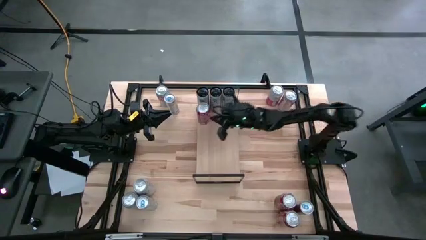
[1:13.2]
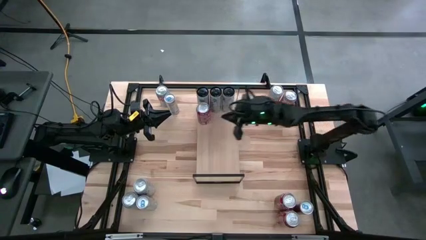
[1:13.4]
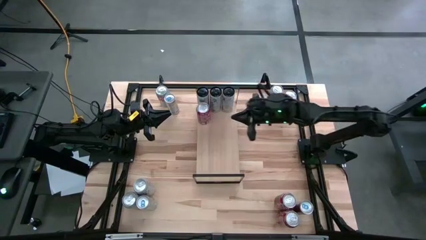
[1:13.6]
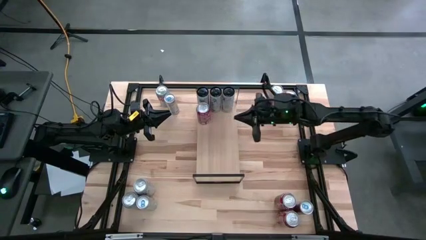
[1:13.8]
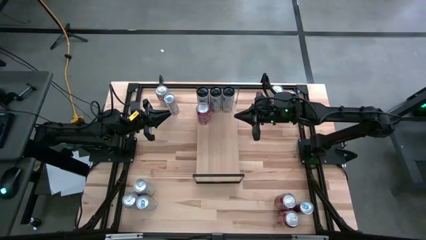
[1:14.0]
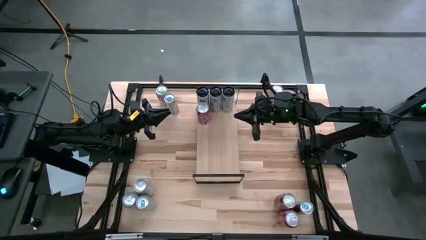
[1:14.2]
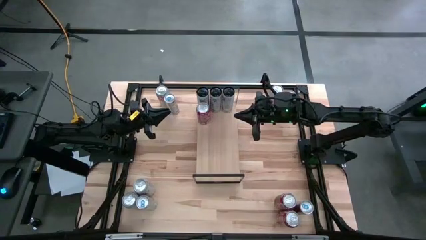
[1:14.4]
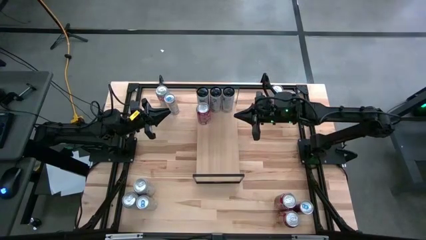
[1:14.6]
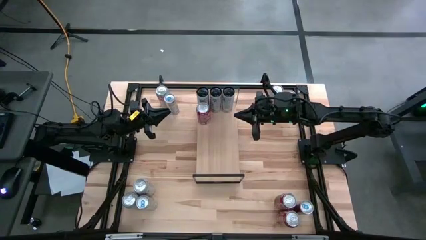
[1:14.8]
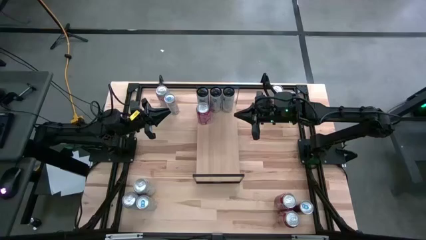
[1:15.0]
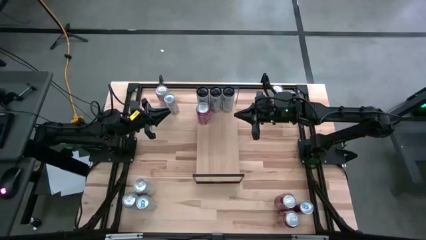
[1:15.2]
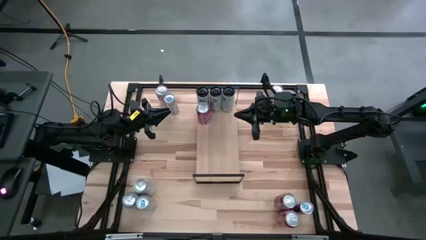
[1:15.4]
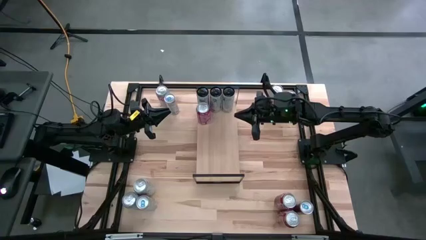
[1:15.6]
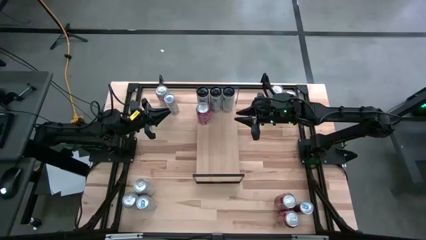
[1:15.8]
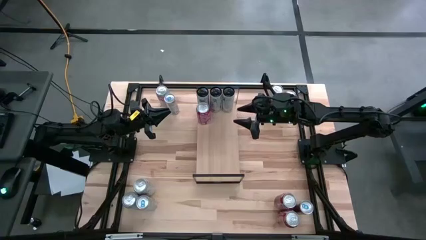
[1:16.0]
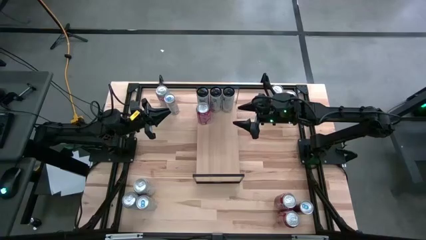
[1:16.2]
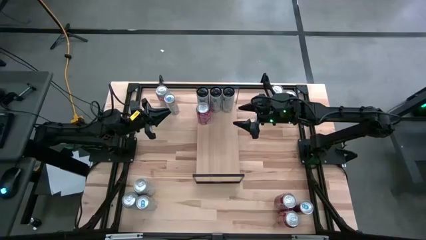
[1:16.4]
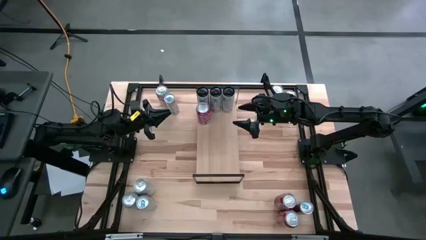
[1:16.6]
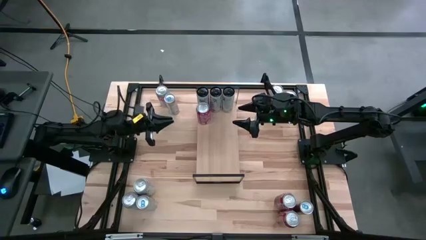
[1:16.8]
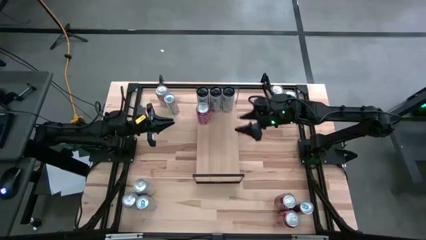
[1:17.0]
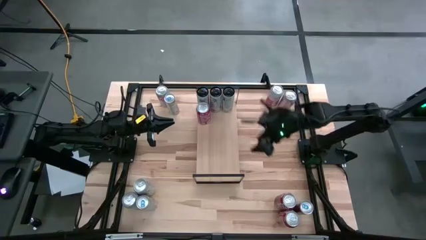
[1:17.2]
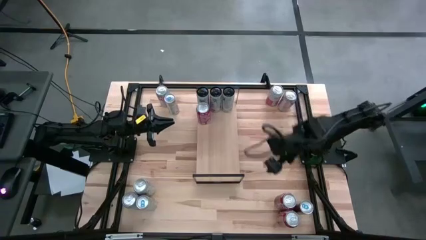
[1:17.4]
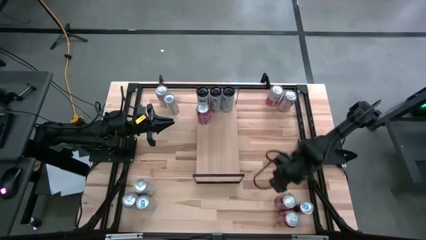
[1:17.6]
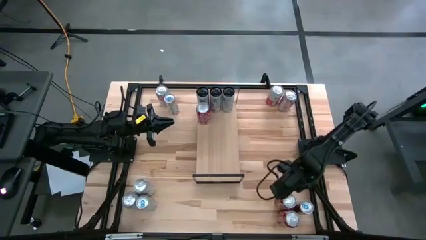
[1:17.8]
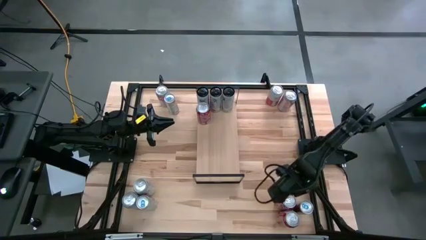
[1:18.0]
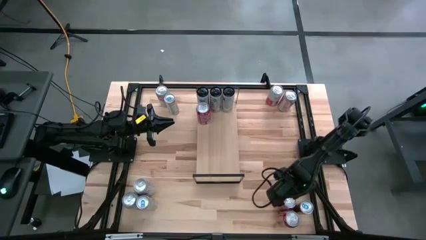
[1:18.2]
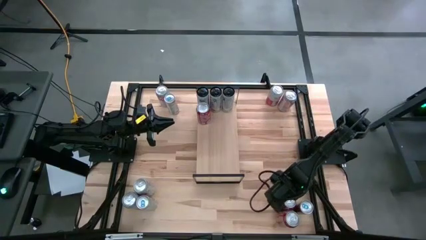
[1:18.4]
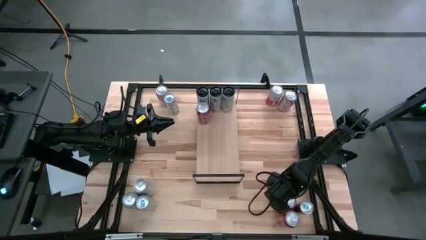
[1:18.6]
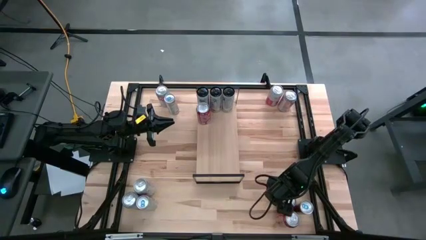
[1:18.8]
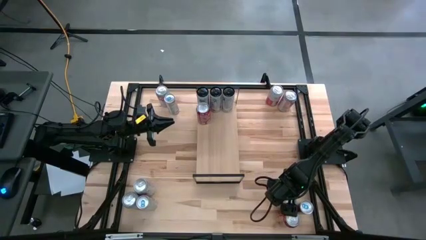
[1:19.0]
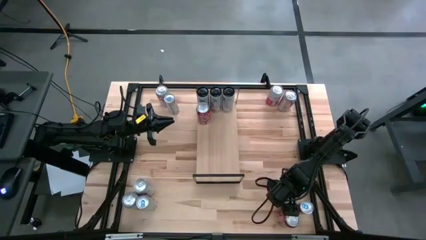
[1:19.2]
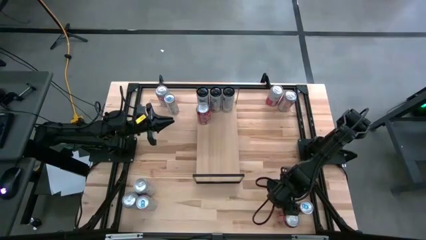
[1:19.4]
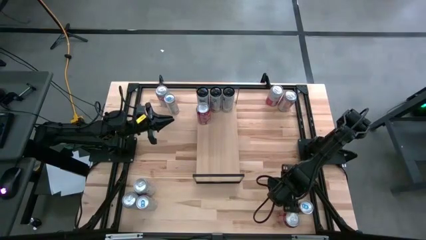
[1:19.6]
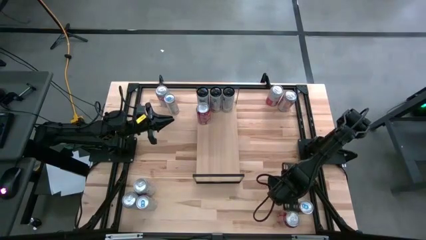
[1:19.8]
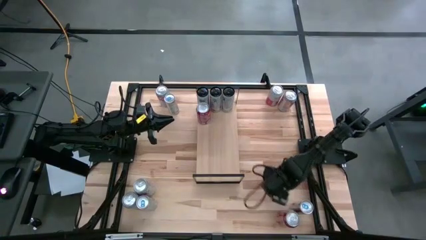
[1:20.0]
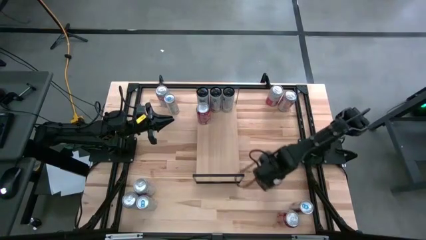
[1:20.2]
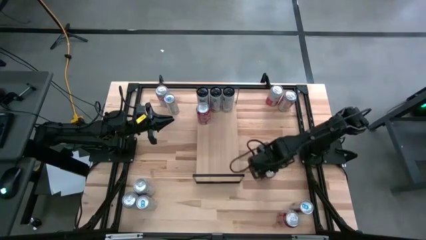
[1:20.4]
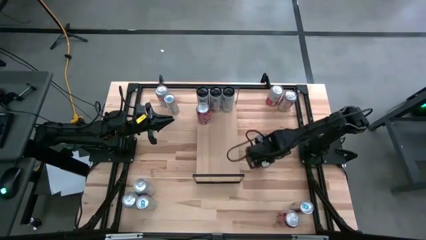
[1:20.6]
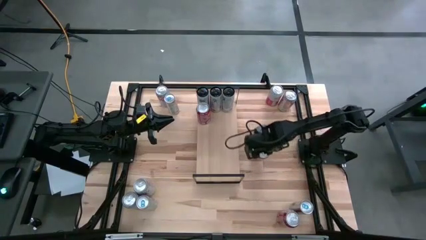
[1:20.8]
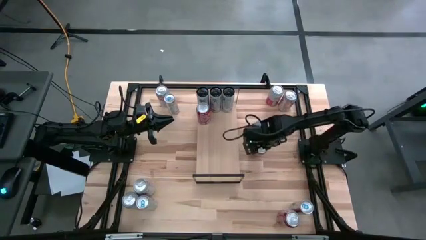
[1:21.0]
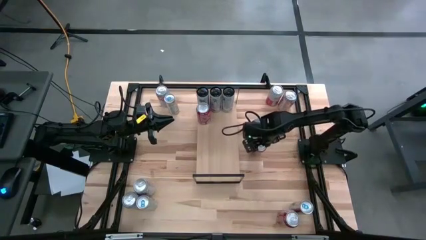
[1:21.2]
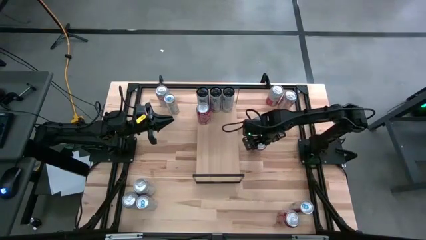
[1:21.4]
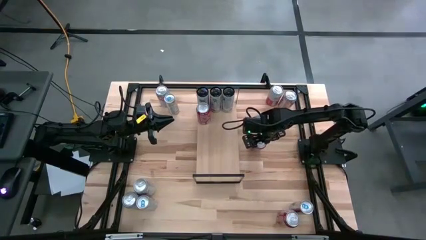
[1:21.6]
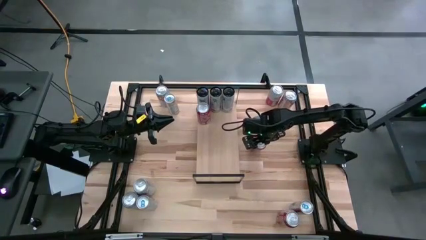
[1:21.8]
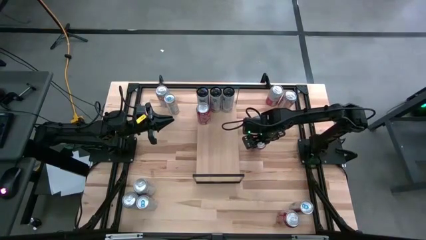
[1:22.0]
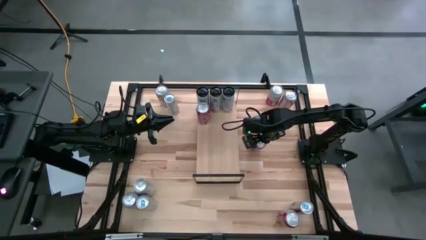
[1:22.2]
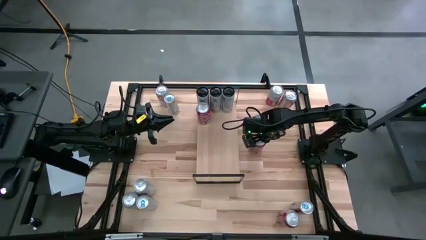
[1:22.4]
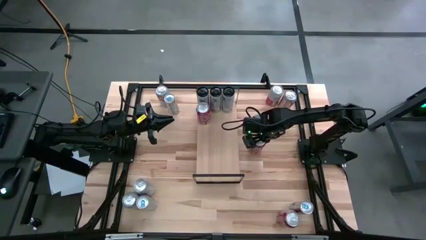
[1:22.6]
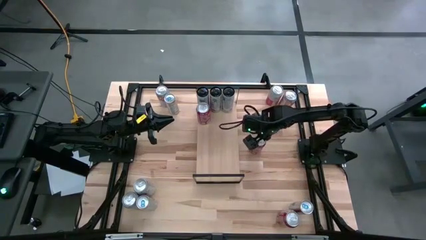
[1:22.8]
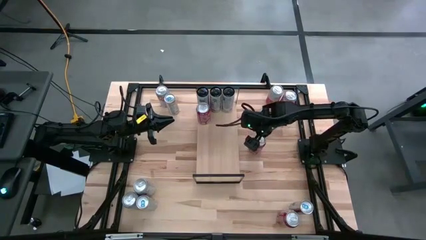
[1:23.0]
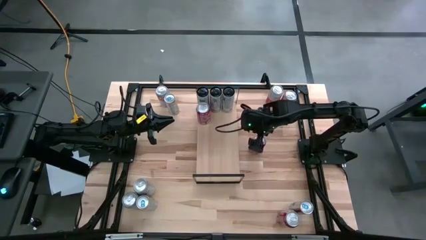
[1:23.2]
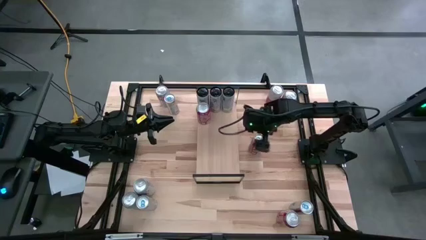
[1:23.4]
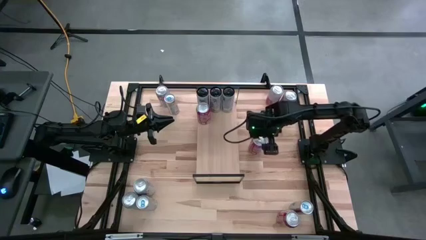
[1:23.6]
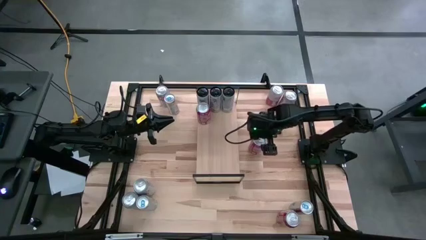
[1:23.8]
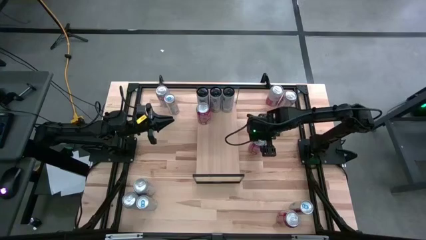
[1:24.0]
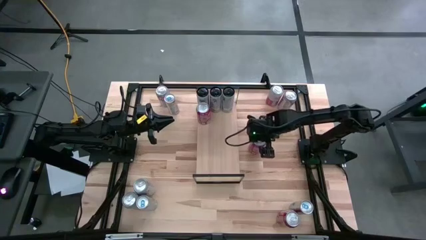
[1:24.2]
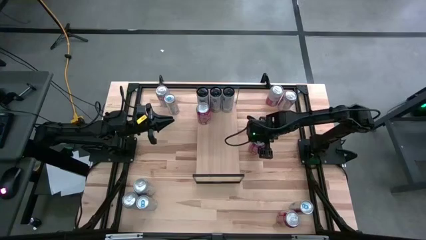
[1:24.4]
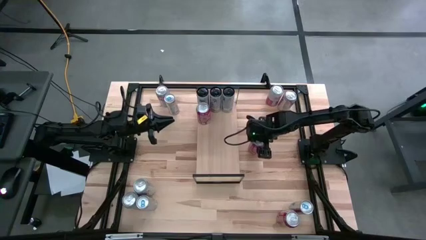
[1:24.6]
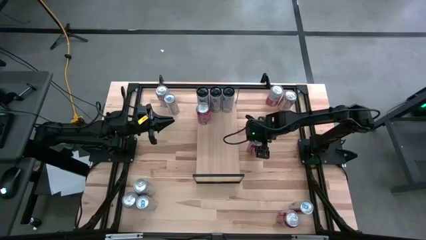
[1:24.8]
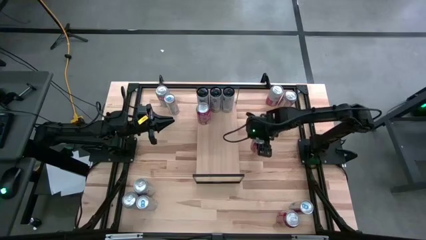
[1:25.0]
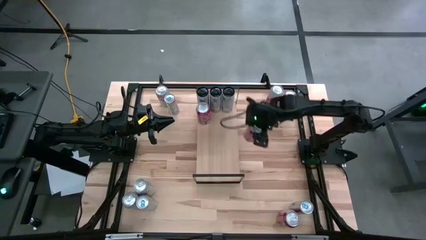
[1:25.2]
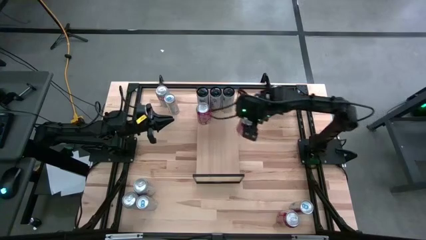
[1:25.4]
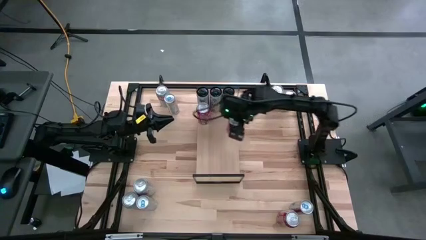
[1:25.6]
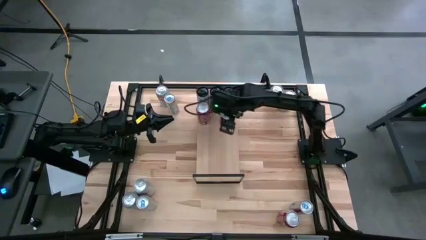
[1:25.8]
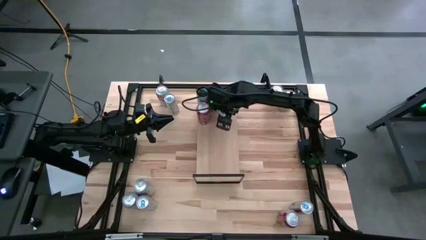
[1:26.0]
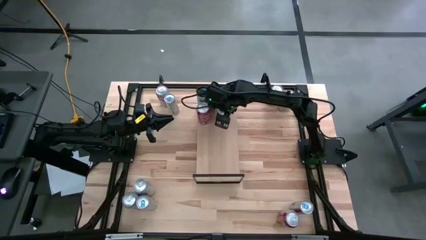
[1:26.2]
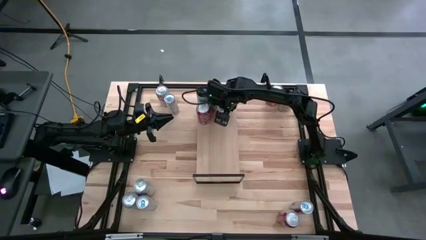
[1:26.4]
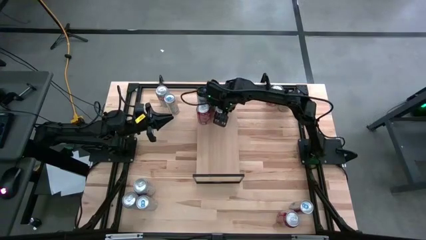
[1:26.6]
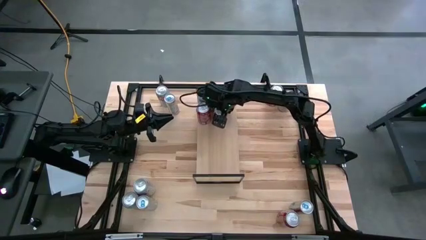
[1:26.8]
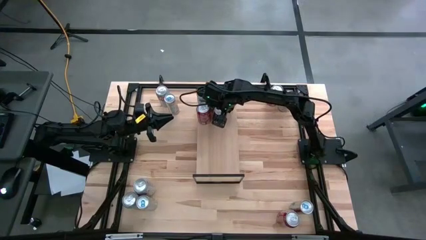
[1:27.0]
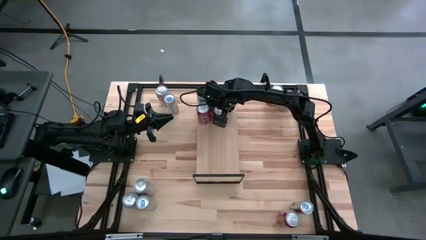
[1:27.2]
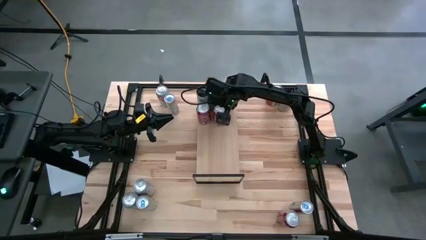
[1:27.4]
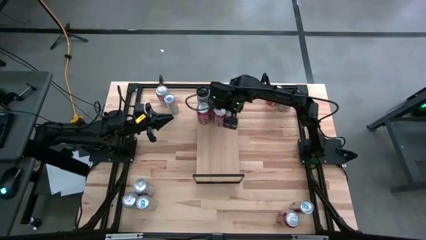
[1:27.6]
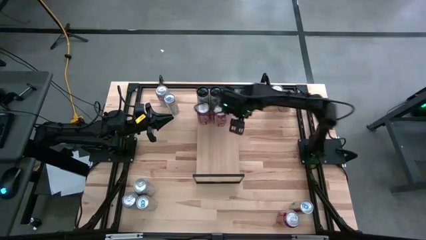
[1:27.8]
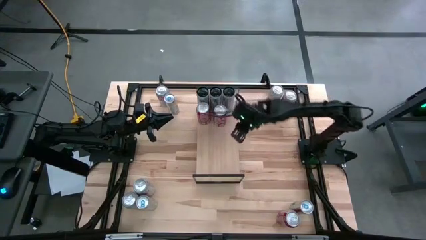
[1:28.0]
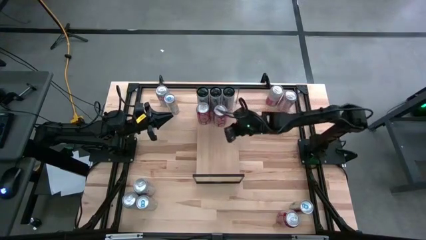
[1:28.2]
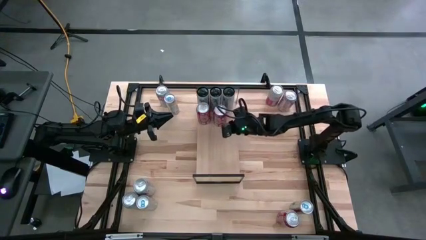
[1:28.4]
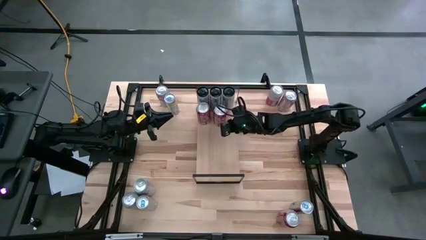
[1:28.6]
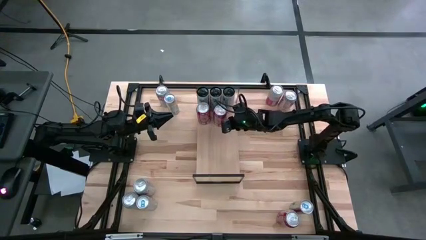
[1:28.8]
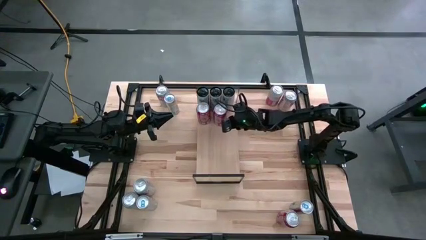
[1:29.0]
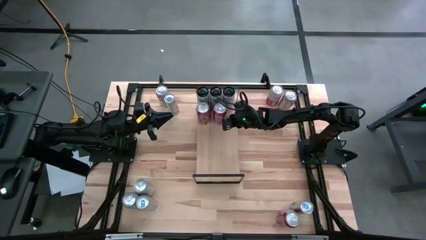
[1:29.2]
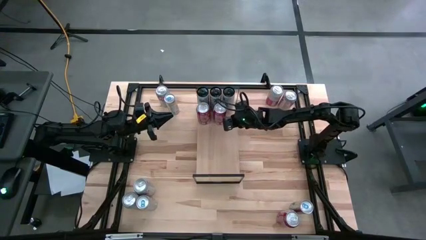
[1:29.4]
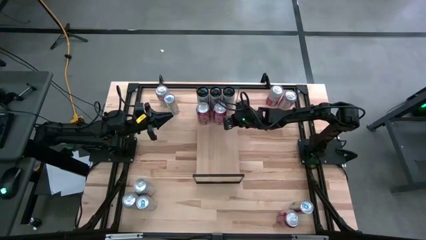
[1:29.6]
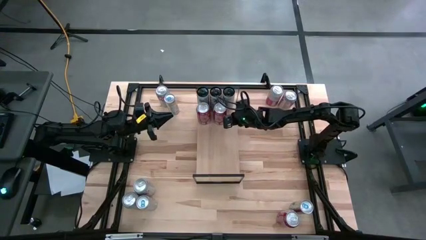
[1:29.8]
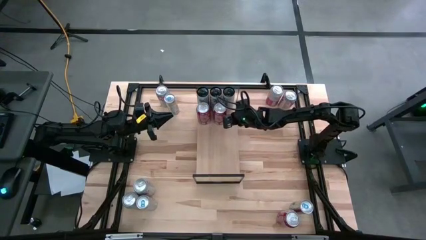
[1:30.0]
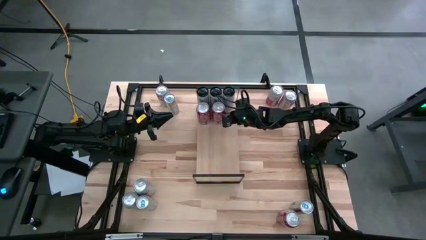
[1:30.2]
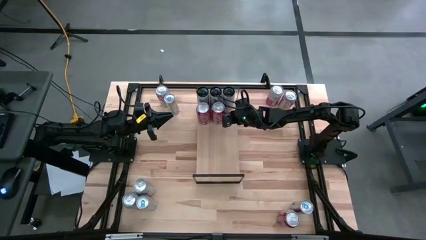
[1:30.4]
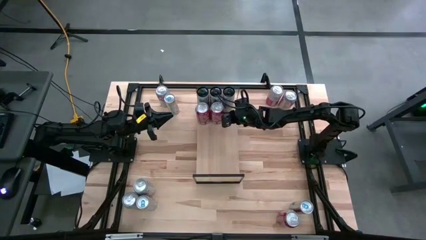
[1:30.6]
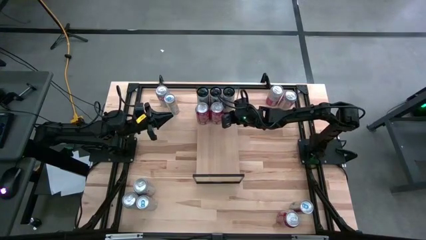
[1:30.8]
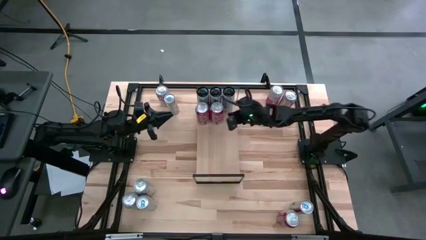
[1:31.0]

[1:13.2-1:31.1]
Task: Place canned beverage on shelf
Put the top red-white soda can on the shelf aligned with the other red-white soda can
